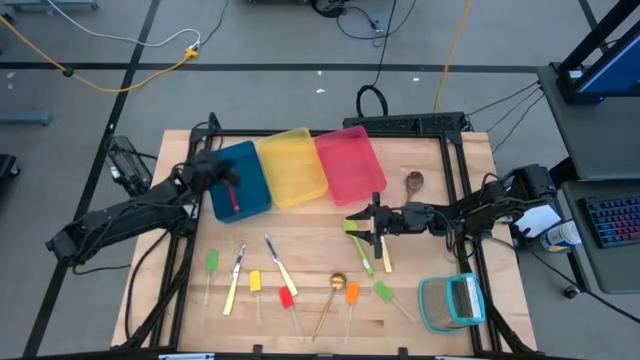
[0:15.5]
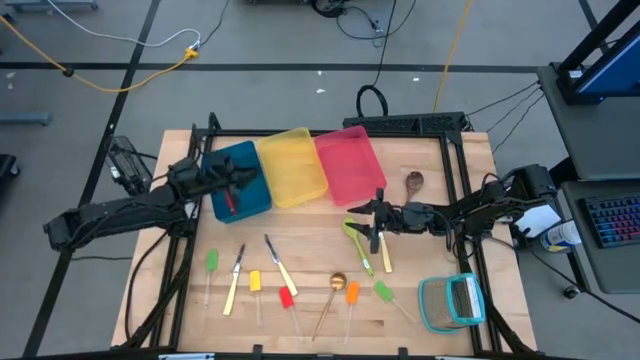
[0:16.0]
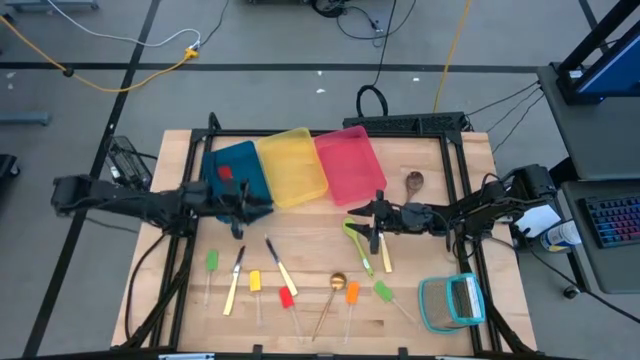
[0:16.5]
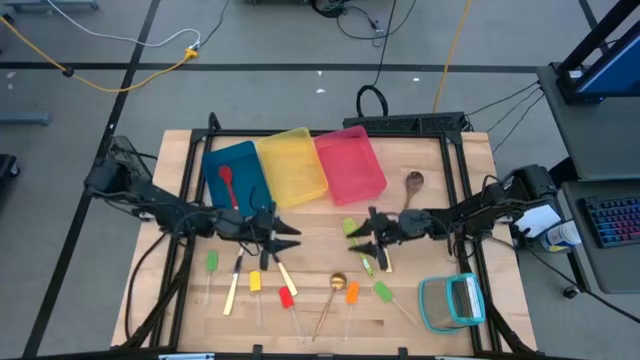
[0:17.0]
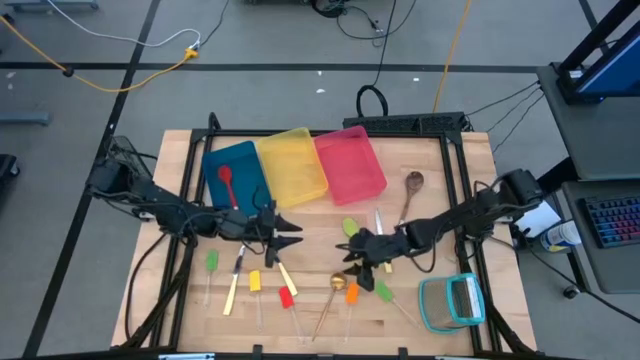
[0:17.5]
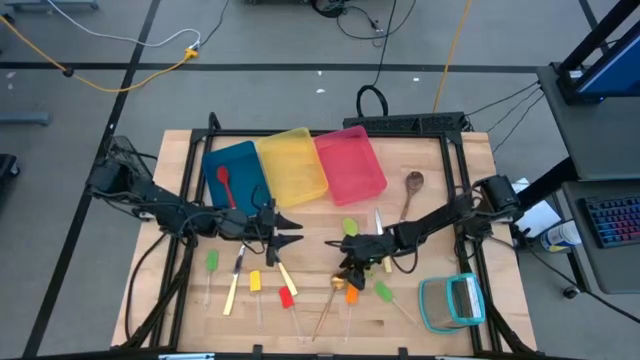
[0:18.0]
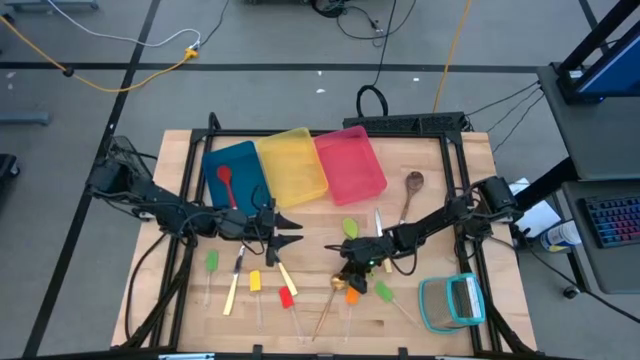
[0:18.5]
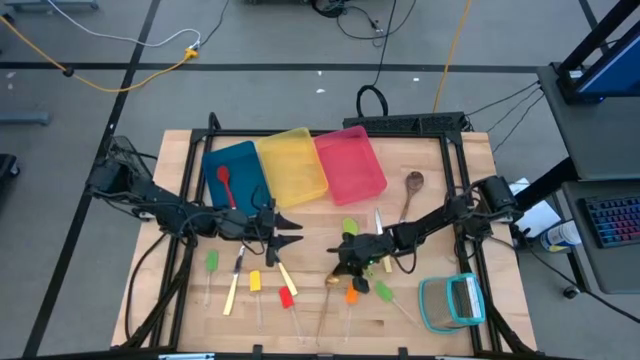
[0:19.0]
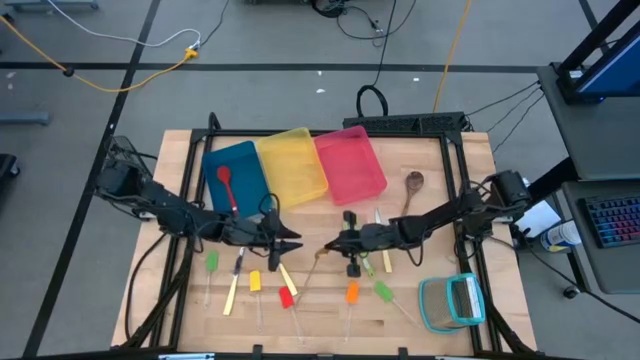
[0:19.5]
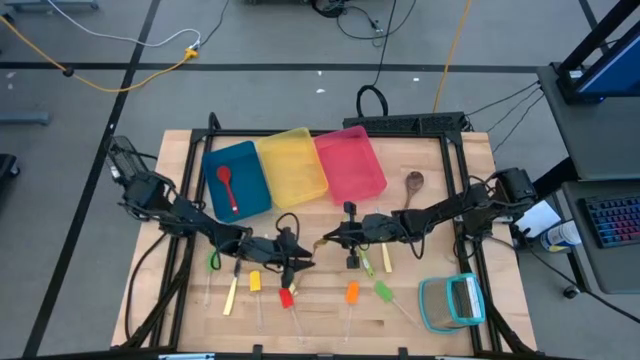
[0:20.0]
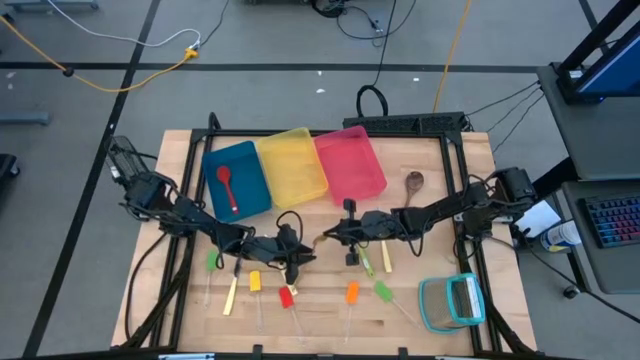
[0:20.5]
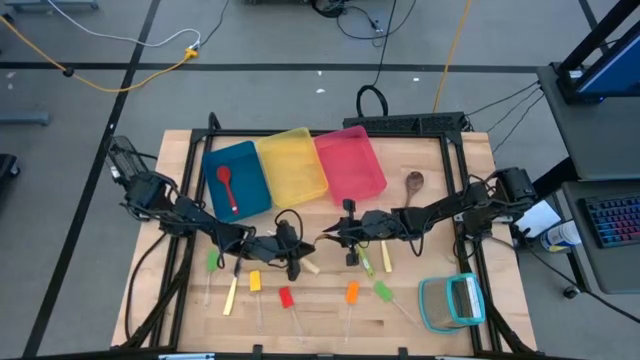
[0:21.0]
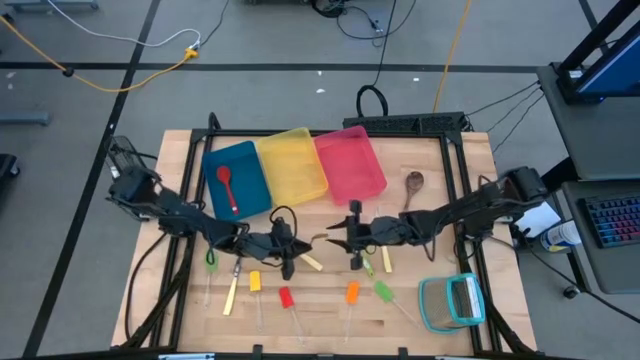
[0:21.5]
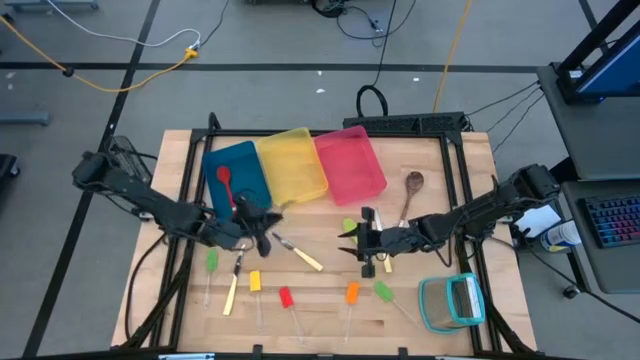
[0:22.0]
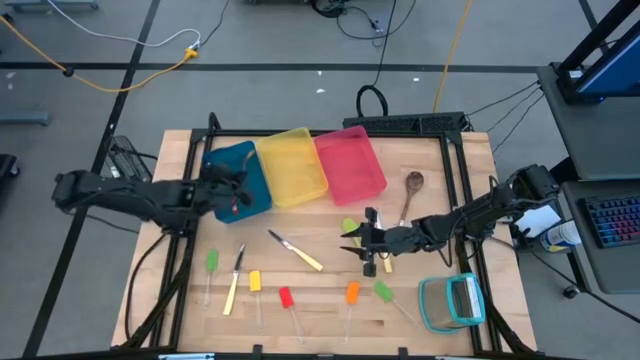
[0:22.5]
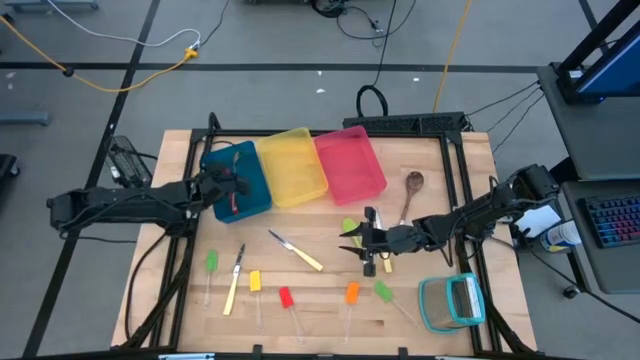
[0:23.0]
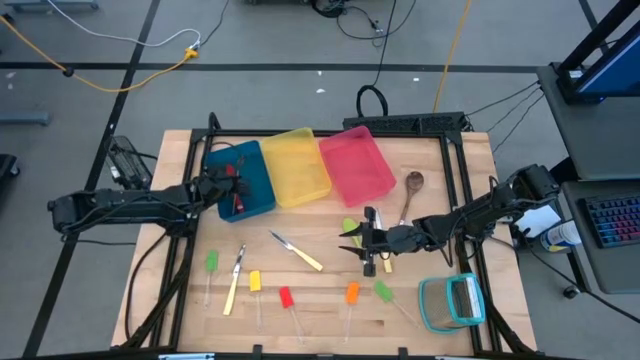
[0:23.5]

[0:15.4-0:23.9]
Task: Pick & Place Kitchen Items
Put the gold serving spoon into the blue bin

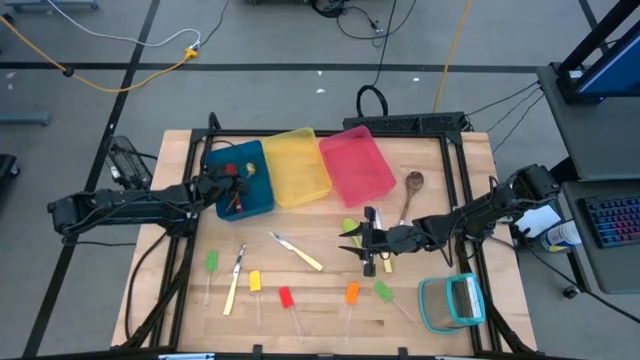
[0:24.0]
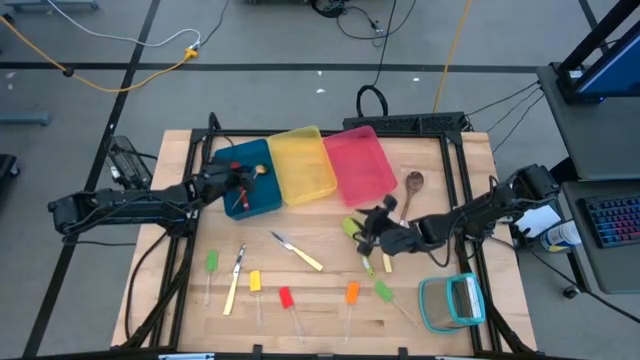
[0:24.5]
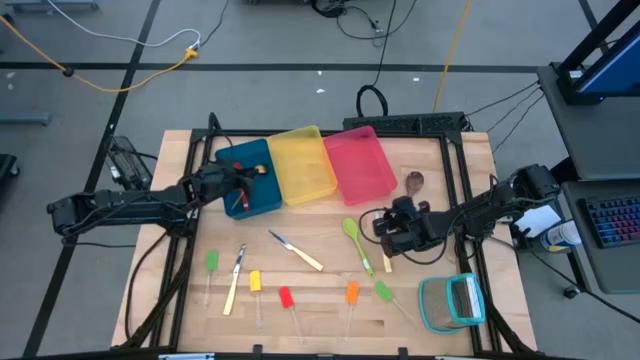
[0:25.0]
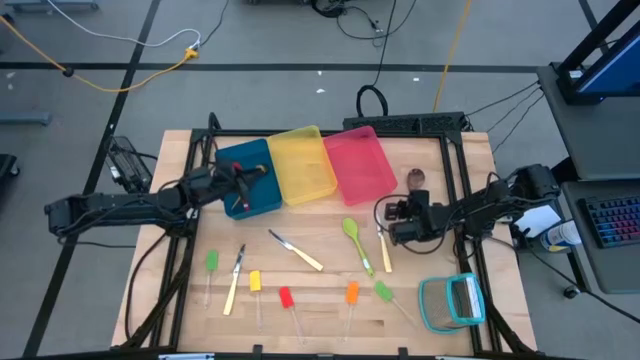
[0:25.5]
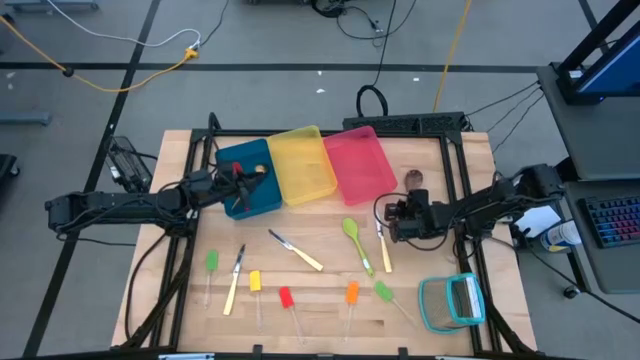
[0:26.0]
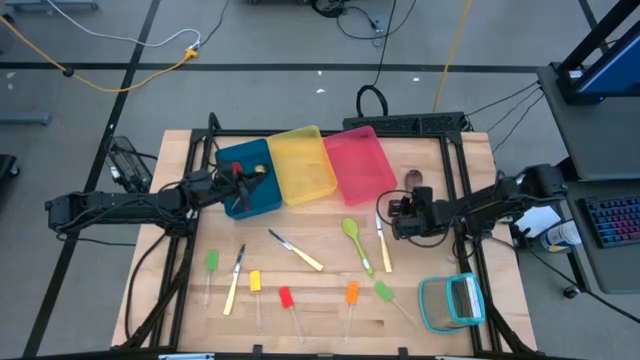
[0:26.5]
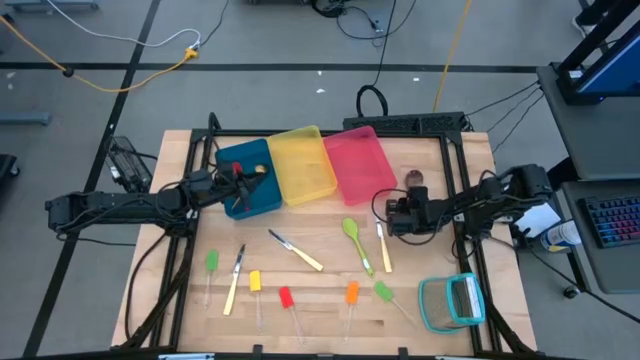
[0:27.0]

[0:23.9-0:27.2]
Put the brown serving spoon into the blue bin

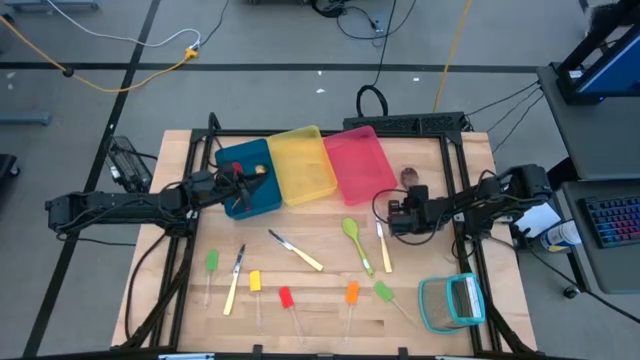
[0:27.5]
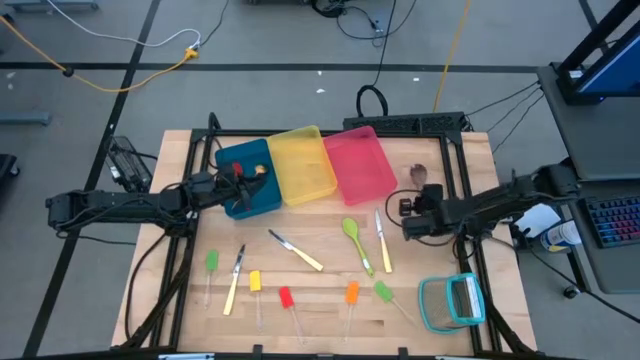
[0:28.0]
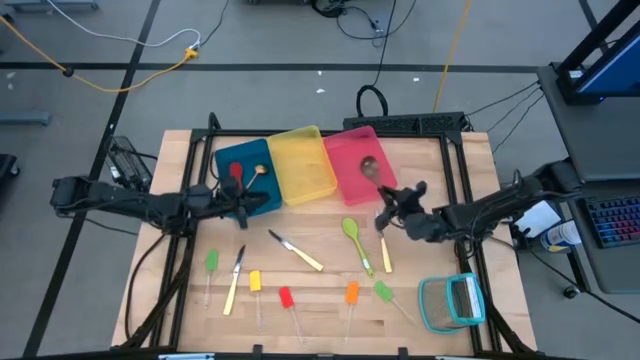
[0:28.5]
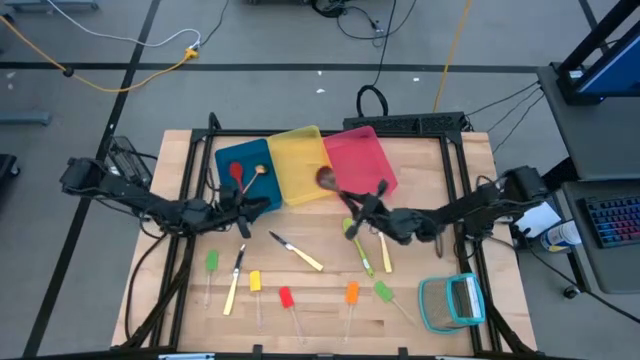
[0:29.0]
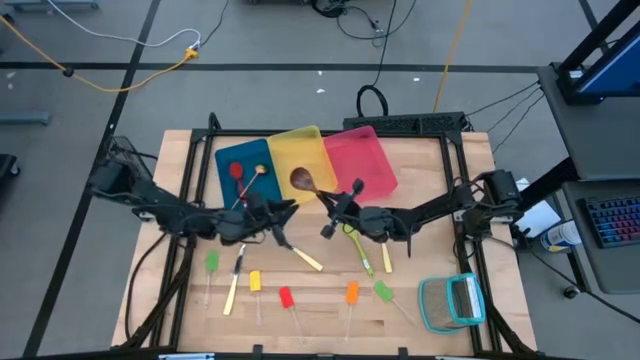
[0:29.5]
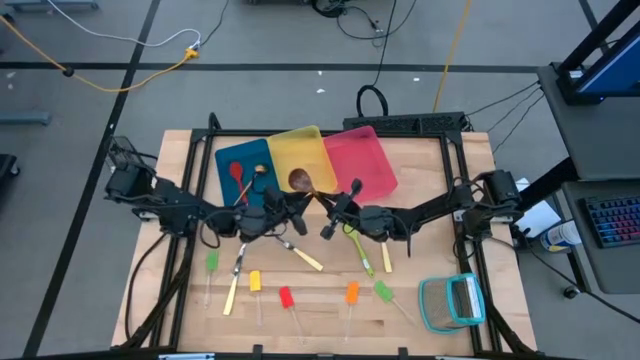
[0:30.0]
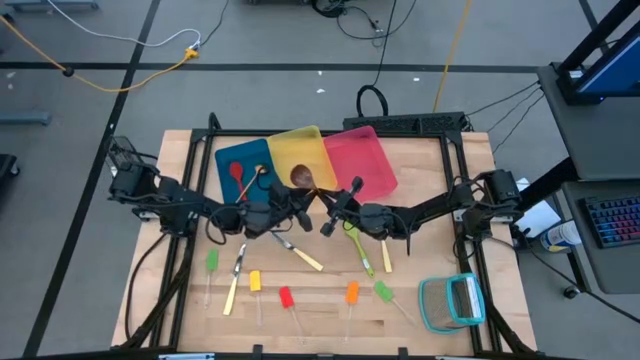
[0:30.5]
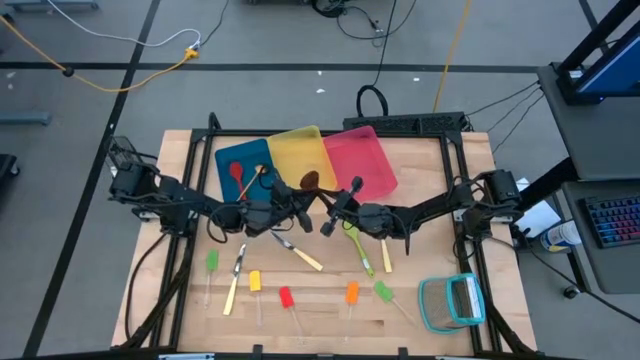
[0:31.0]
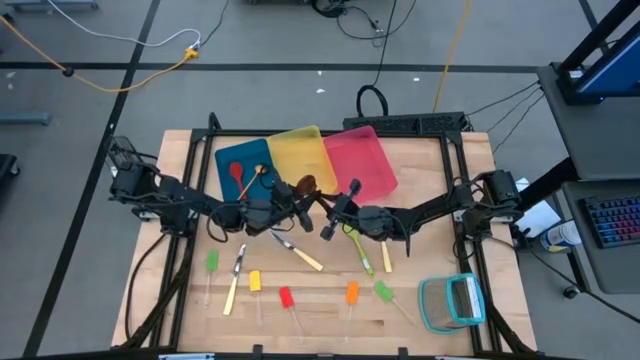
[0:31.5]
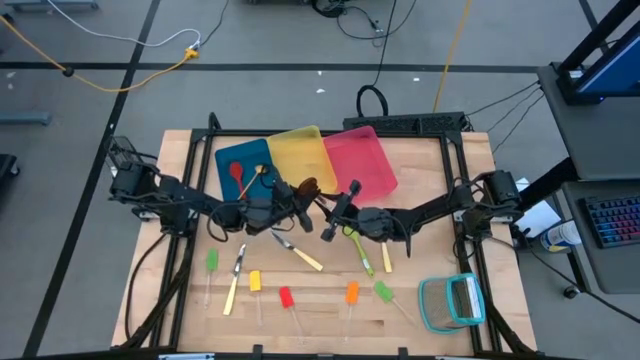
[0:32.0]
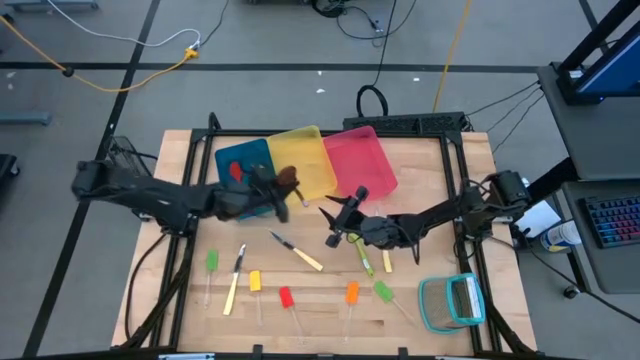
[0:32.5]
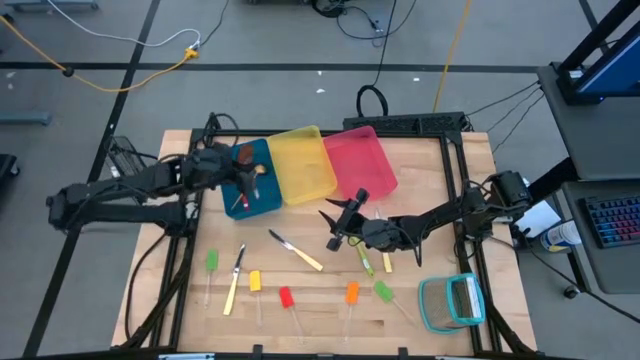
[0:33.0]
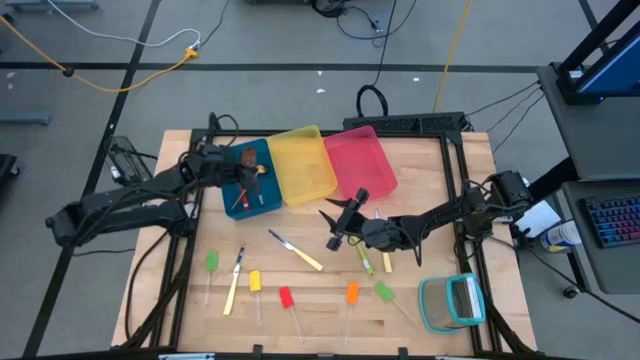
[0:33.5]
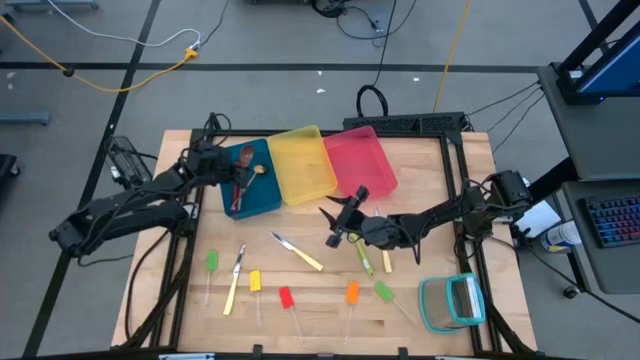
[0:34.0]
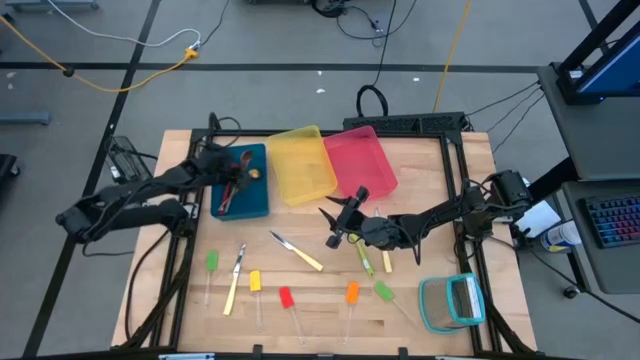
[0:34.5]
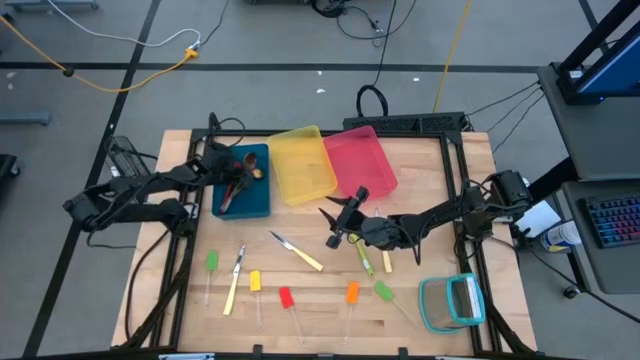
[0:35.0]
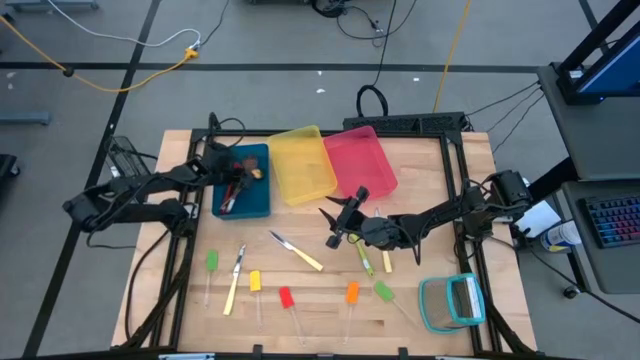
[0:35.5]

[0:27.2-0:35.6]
Put the brown serving spoon into the blue bin

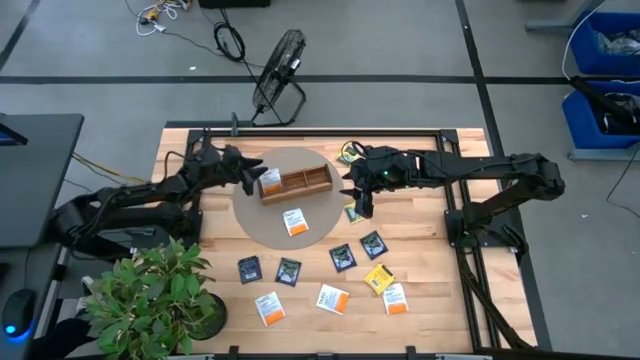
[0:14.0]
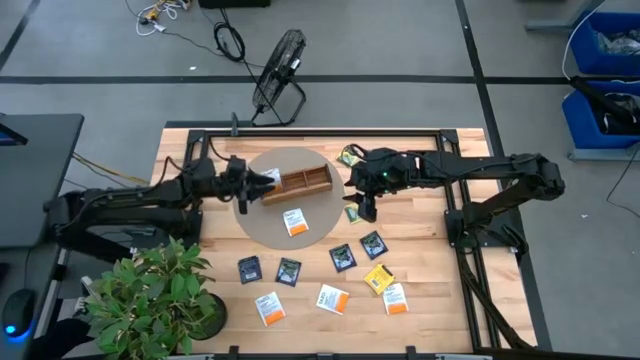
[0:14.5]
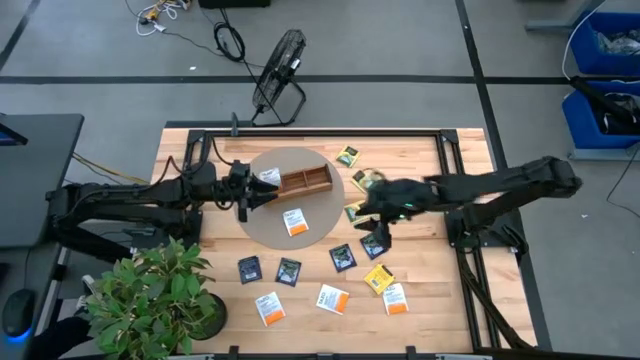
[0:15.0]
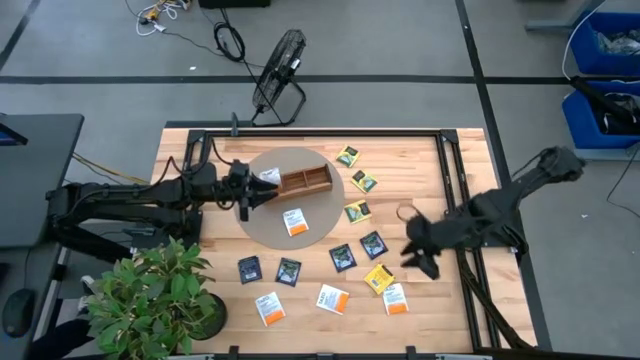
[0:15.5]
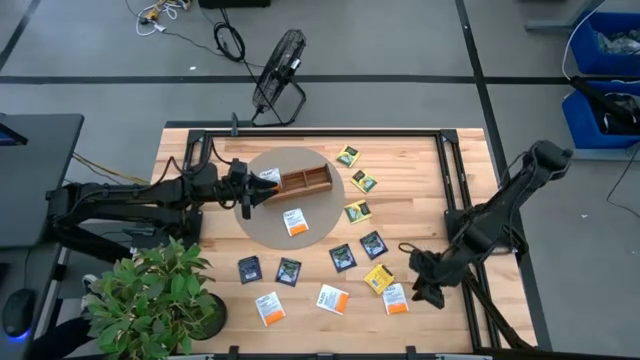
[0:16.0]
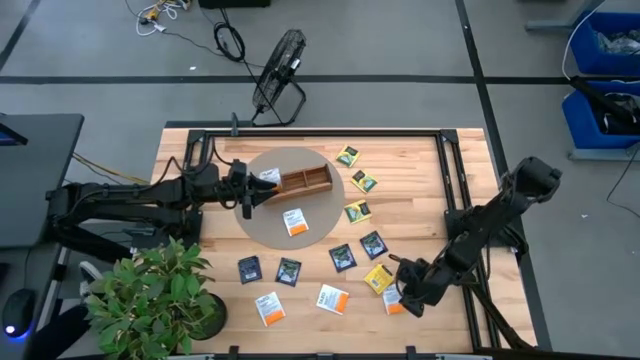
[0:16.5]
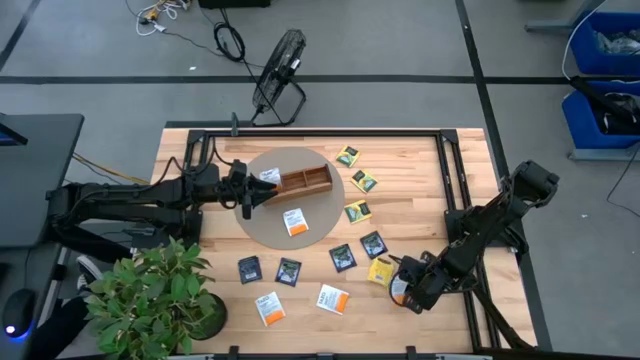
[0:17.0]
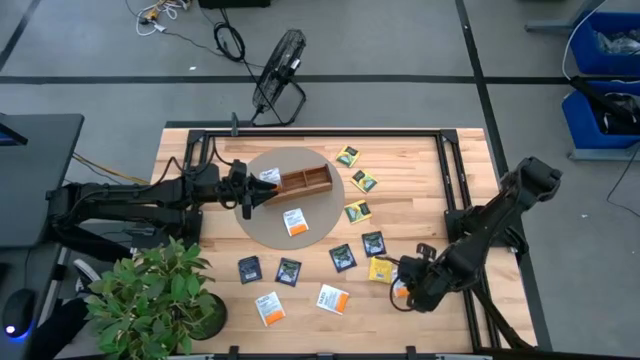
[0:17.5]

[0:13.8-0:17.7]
Task: Pick & Place Tea
Put the white tea bag into the left section of the wooden organizer
